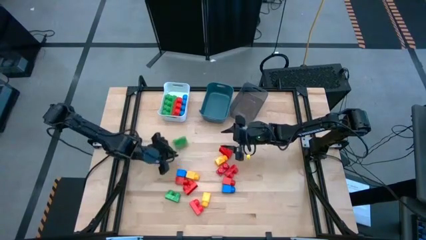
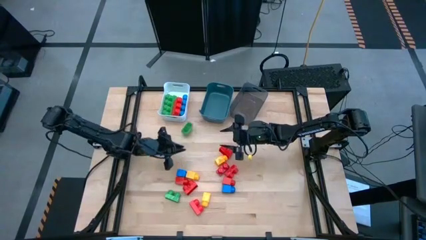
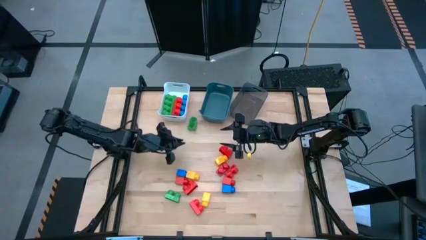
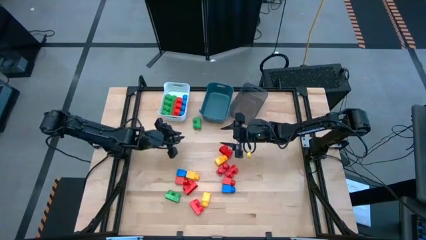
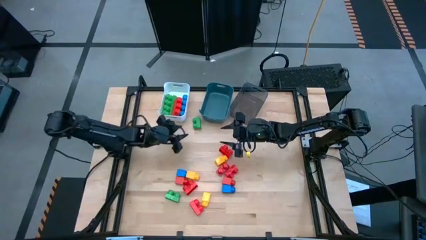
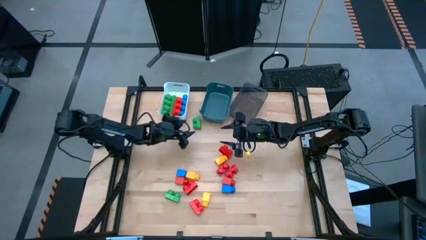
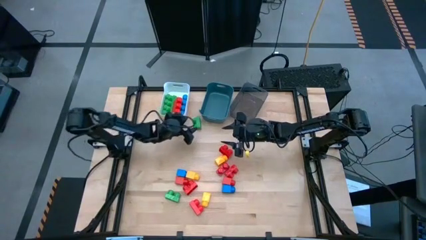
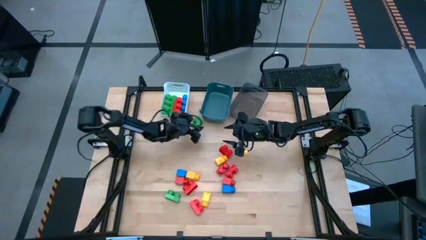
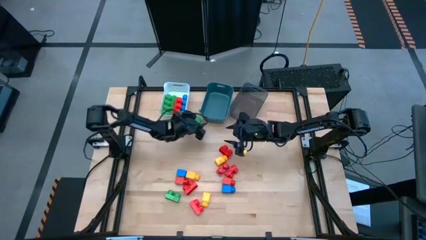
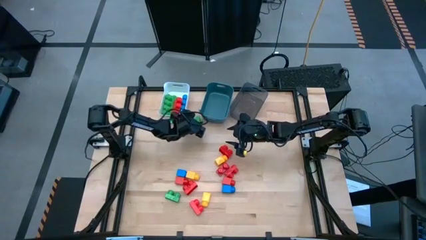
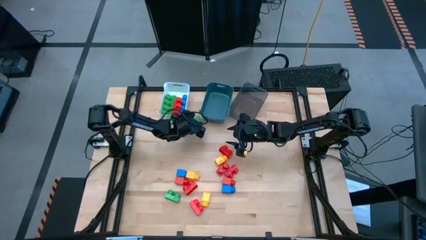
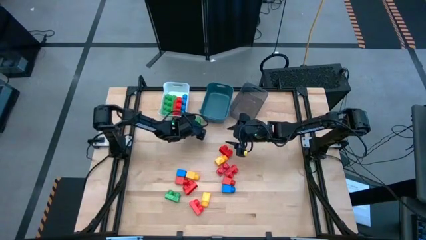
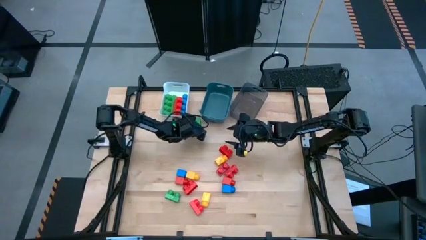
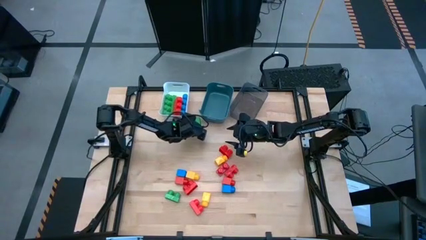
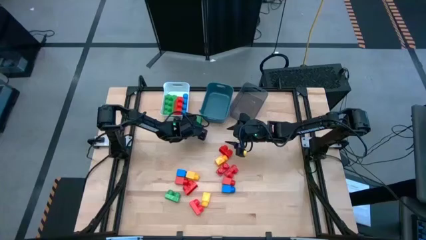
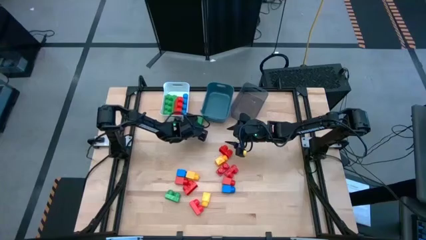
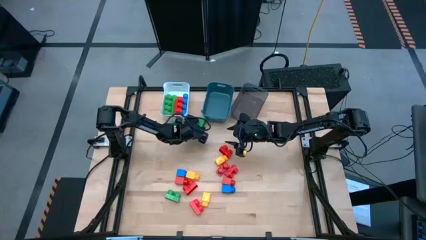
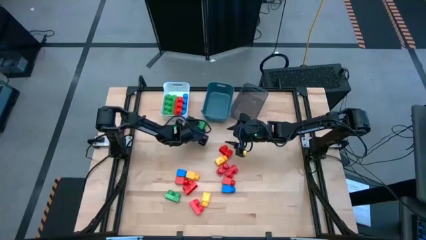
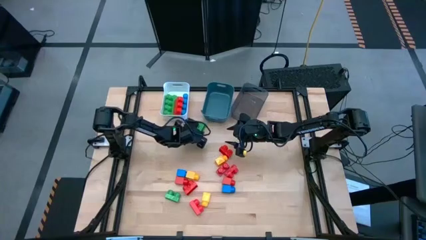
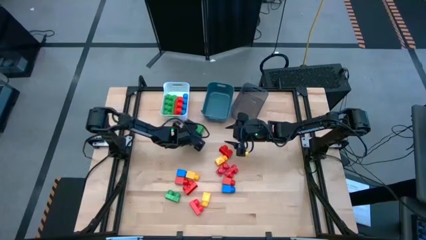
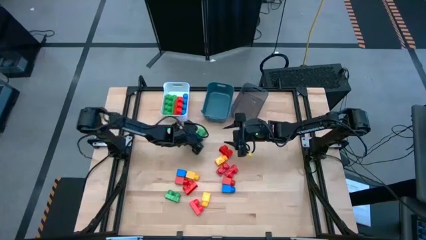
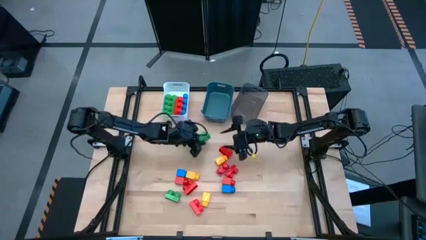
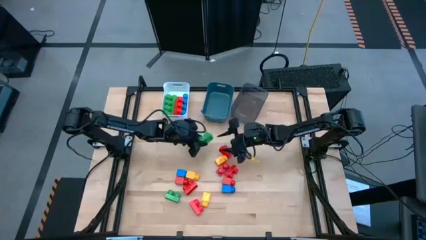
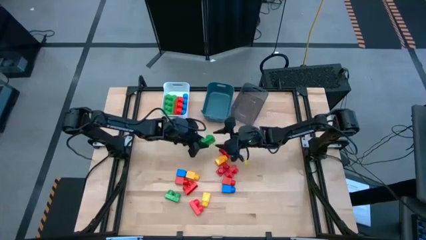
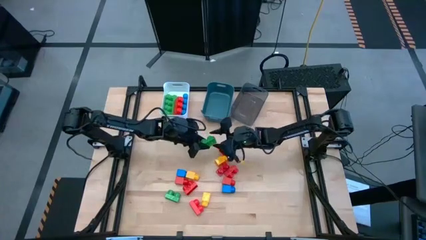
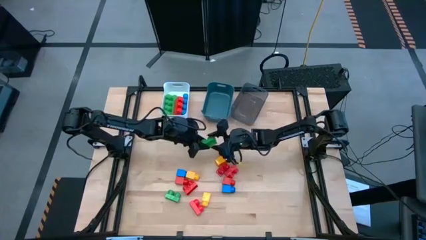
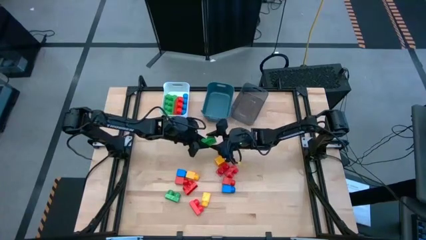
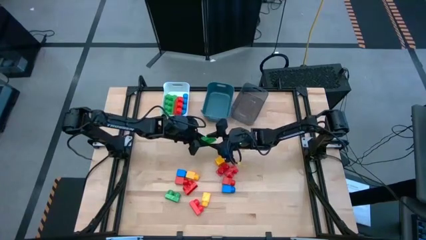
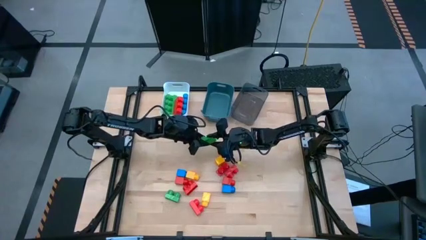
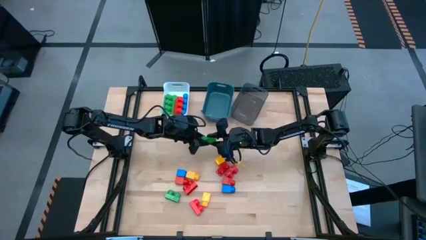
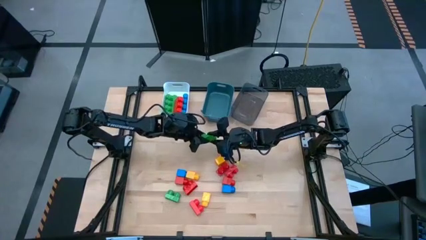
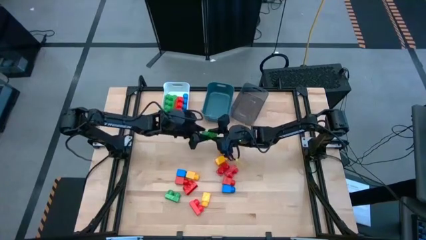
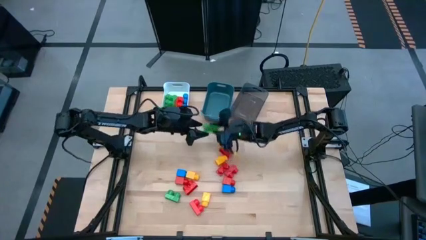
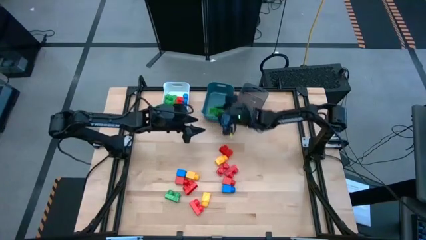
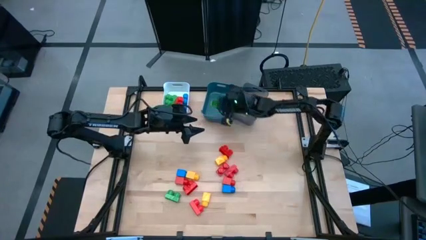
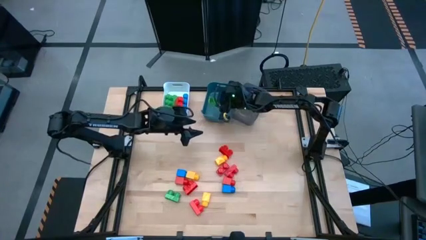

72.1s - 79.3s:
Task: Sort blocks by size
Put the 2 studs green game piece into the blue bin

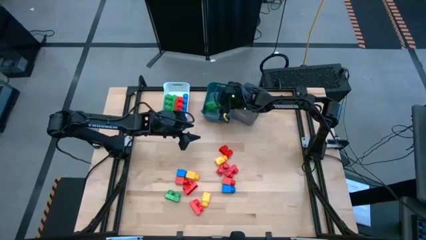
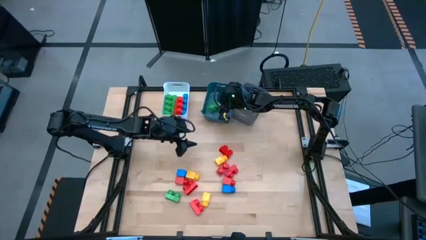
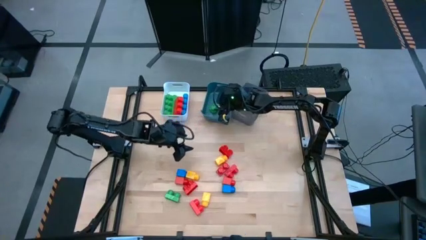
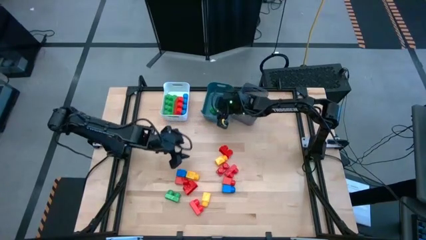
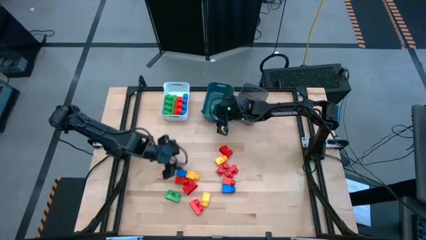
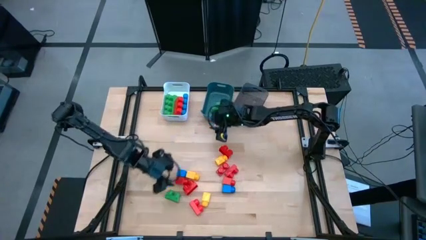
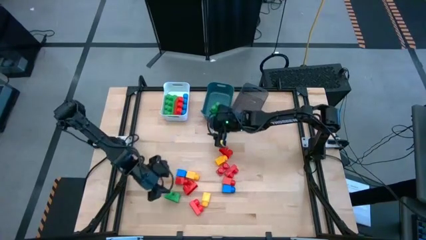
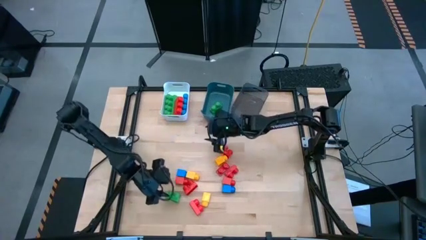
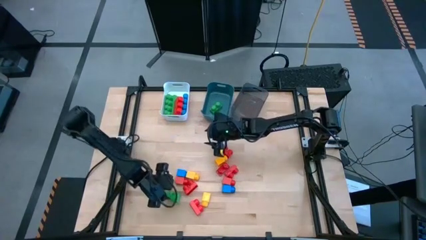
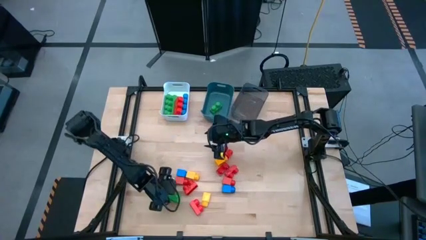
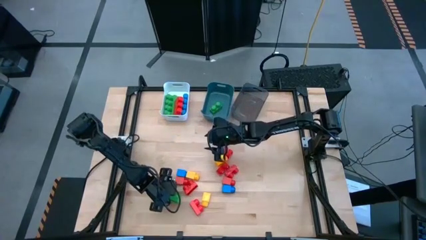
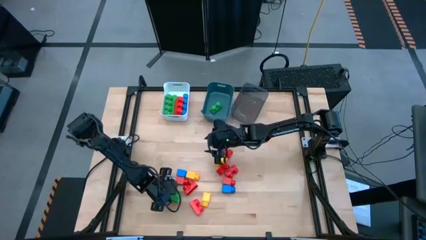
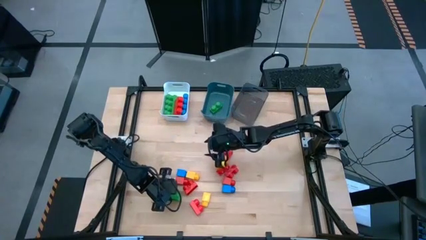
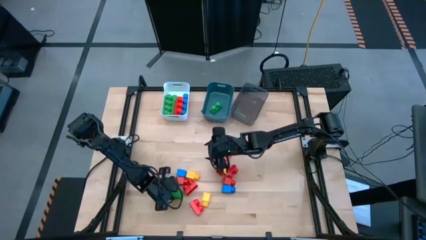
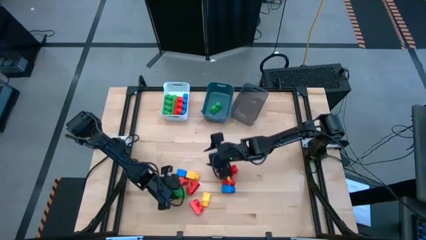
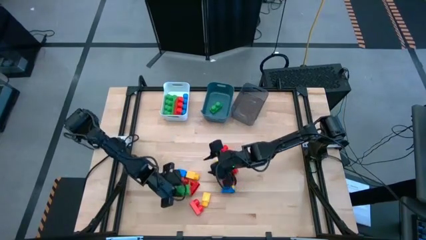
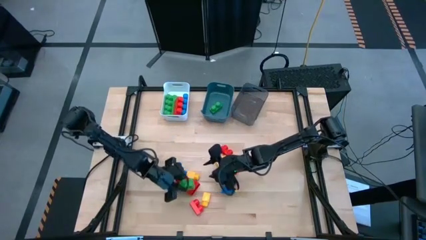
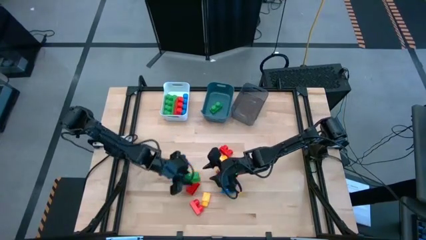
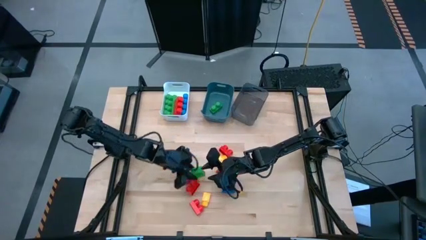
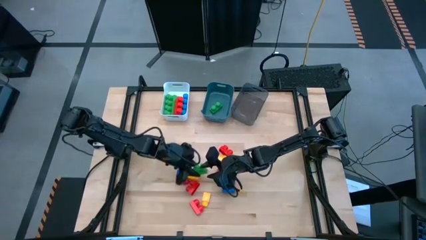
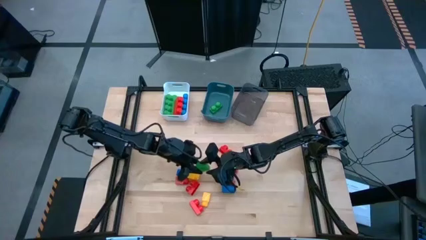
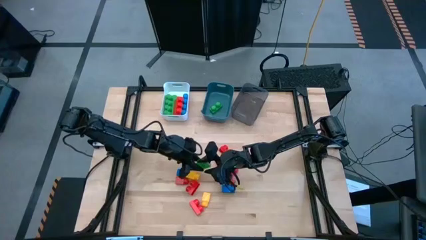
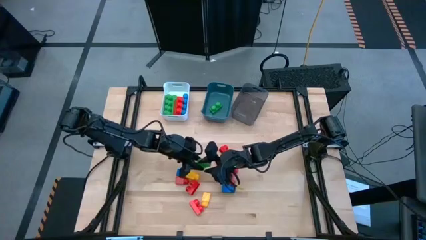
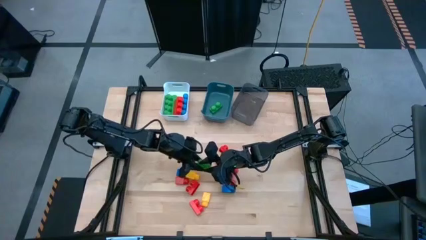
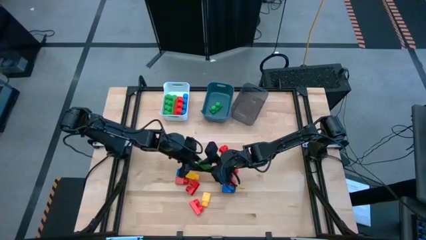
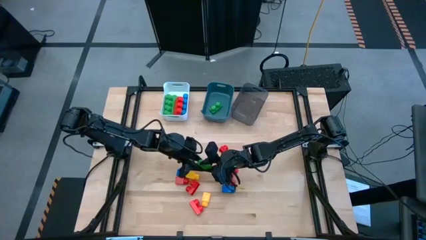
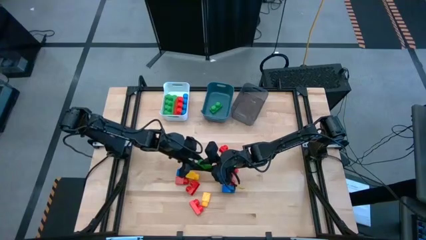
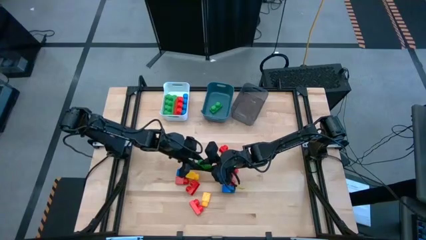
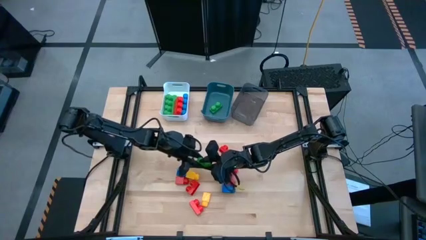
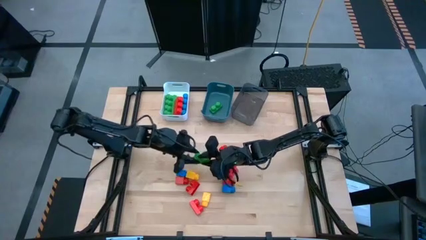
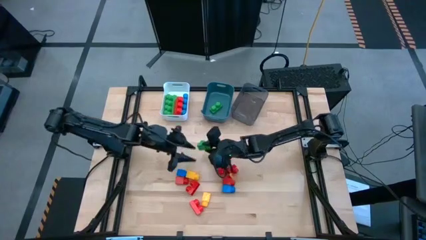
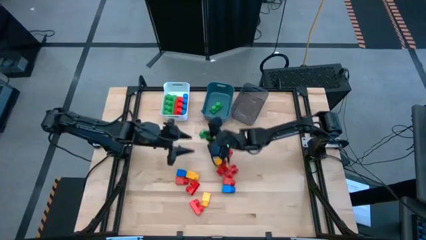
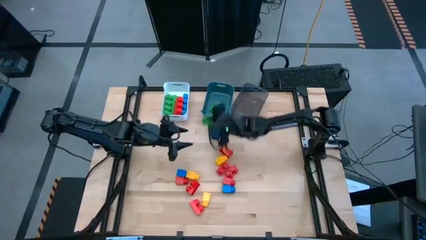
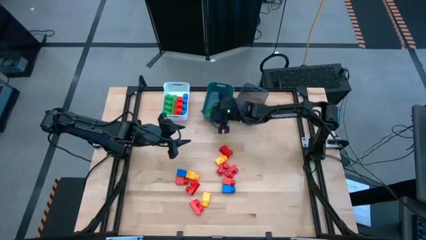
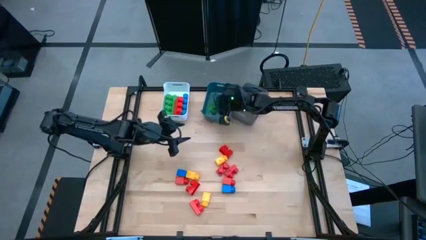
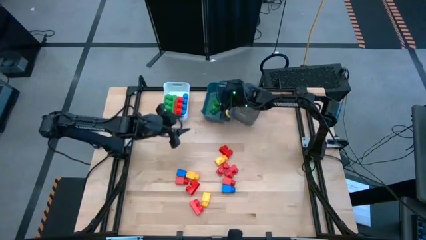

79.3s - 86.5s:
Put the 2 studs green game piece into the blue bin

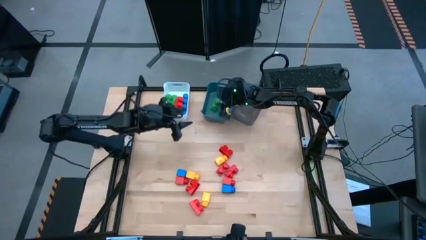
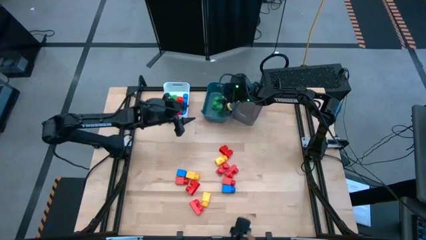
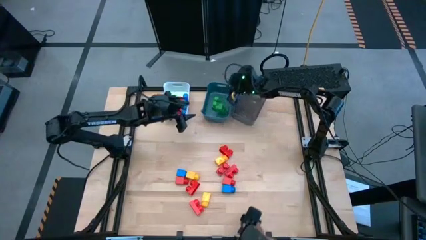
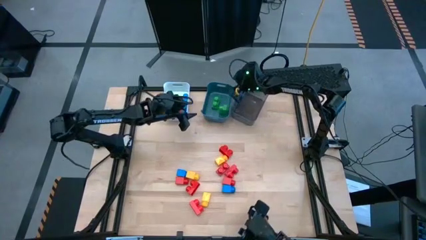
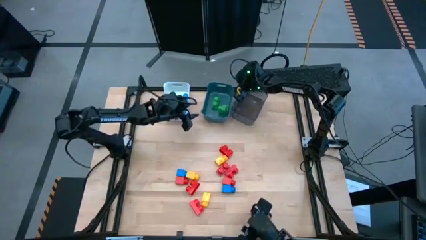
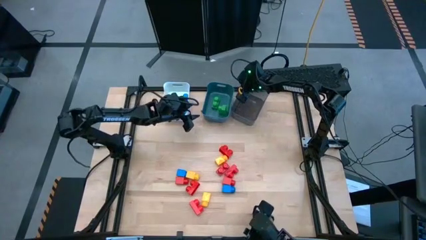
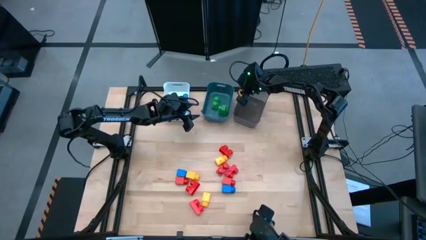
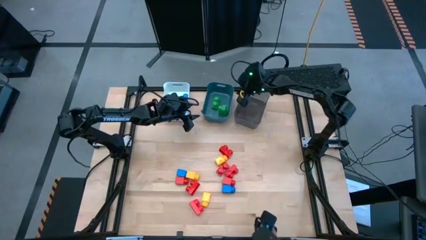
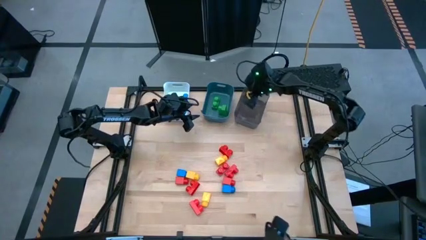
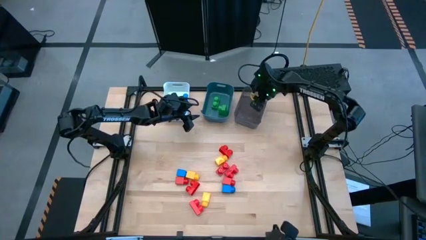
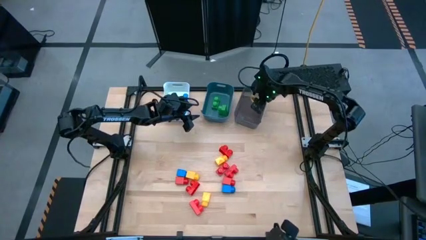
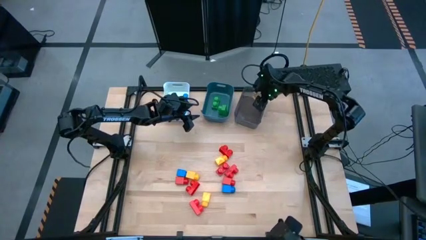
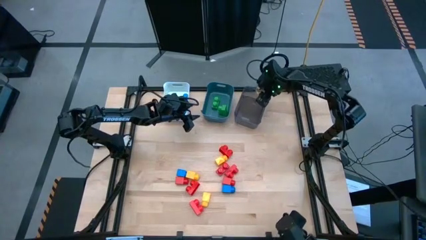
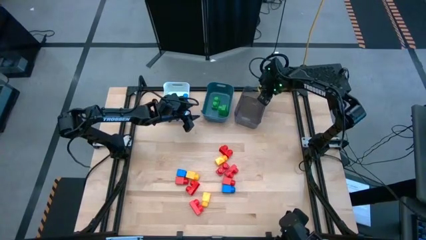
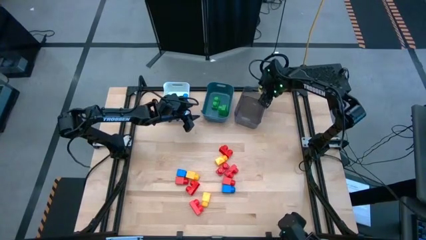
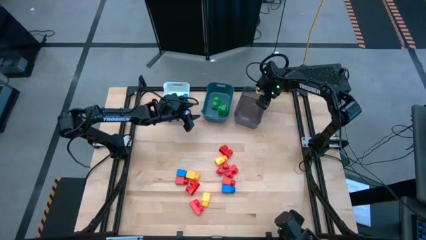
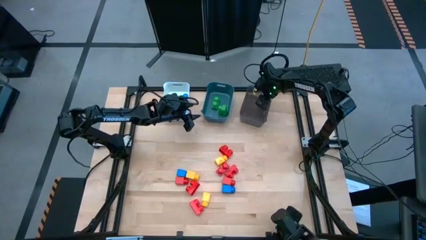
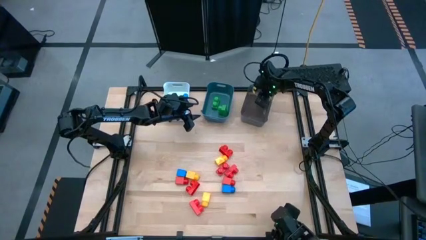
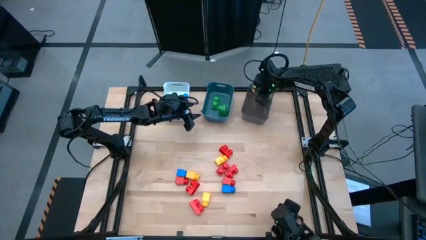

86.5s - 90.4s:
Adjust the black bin
